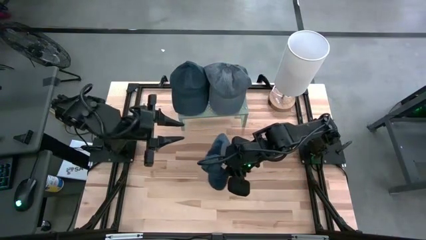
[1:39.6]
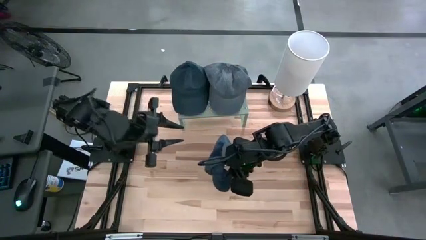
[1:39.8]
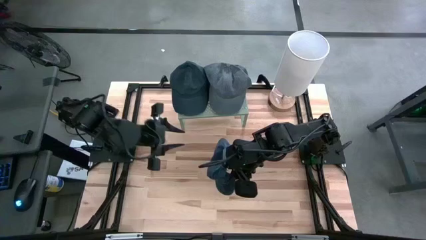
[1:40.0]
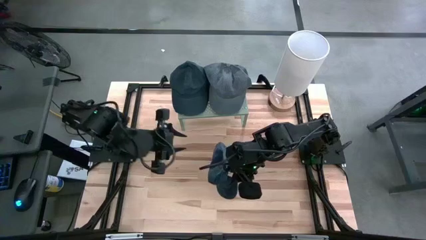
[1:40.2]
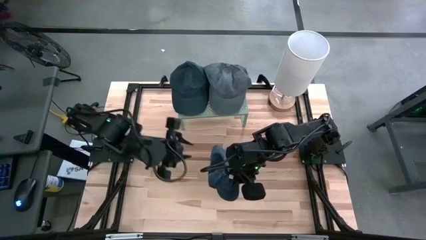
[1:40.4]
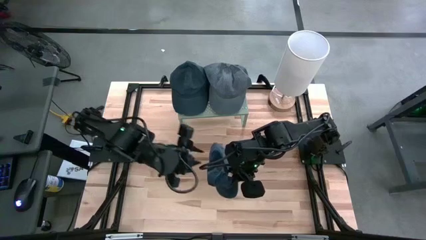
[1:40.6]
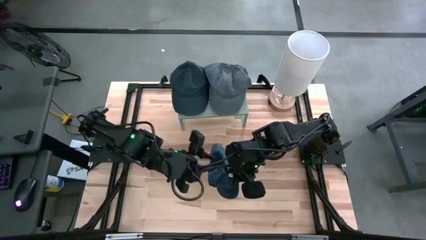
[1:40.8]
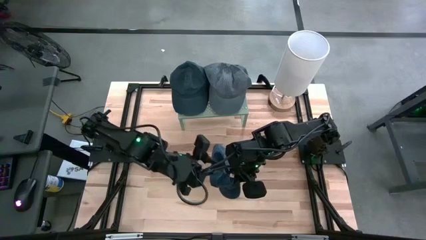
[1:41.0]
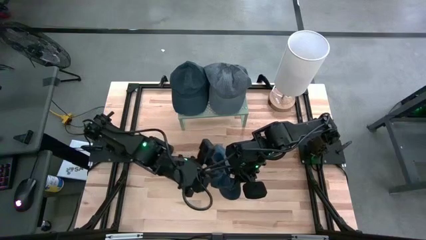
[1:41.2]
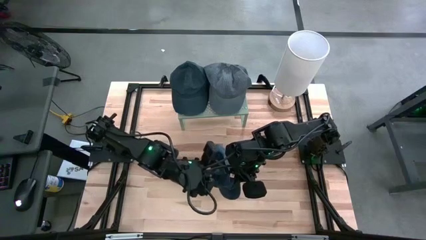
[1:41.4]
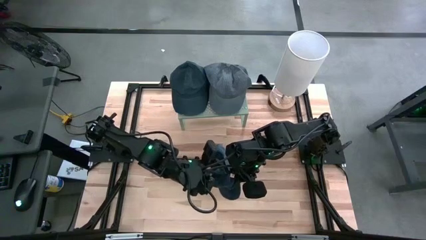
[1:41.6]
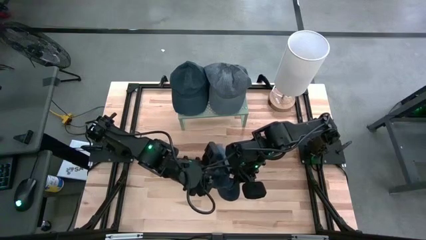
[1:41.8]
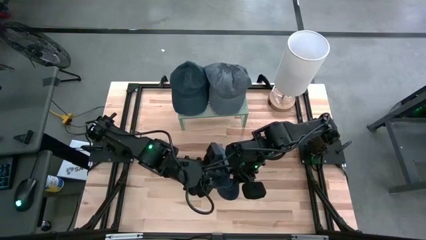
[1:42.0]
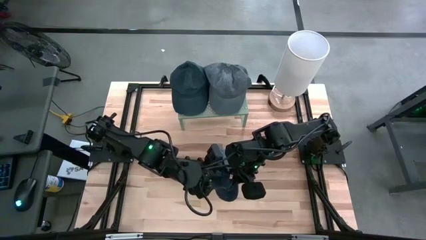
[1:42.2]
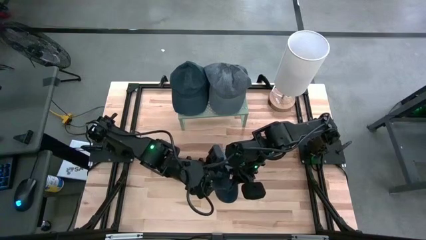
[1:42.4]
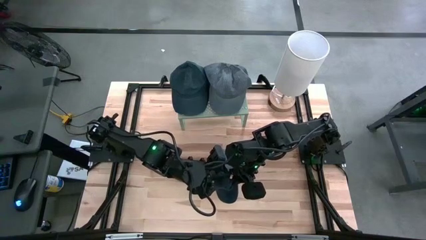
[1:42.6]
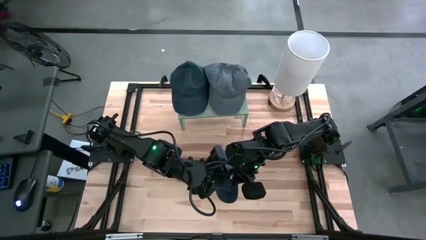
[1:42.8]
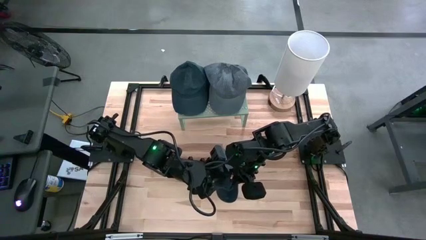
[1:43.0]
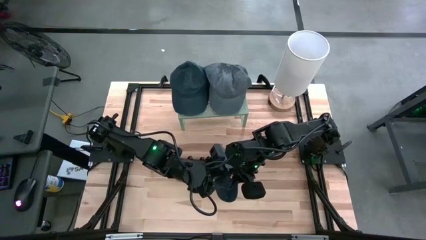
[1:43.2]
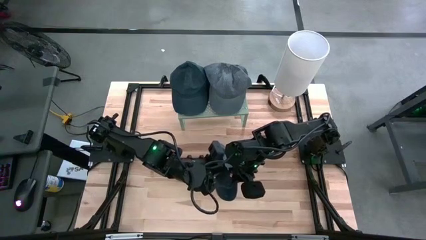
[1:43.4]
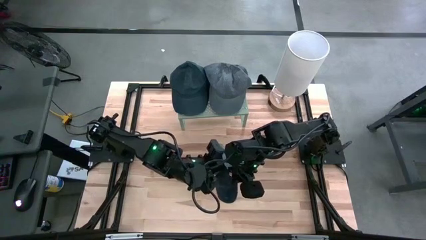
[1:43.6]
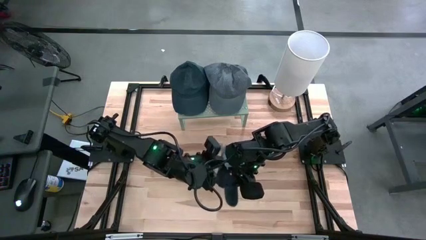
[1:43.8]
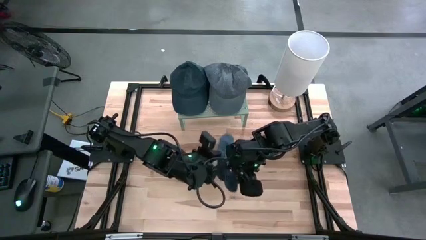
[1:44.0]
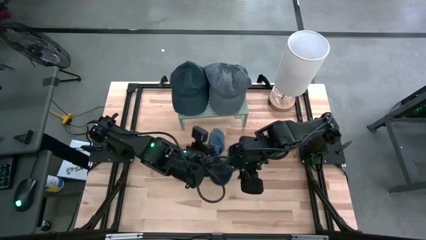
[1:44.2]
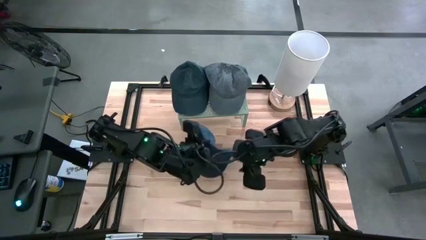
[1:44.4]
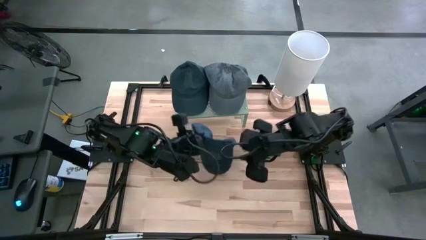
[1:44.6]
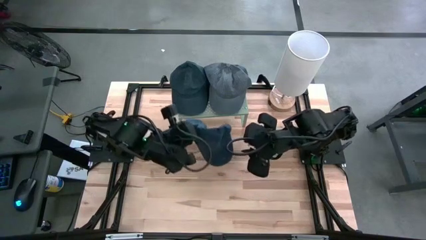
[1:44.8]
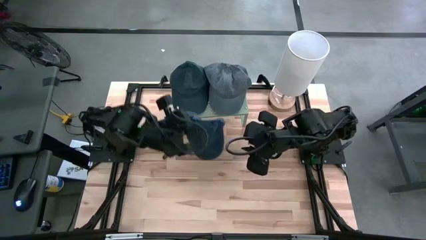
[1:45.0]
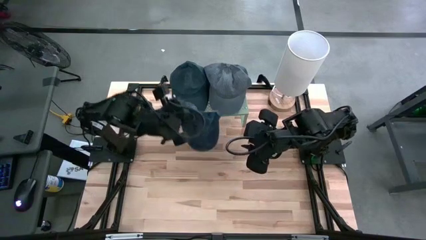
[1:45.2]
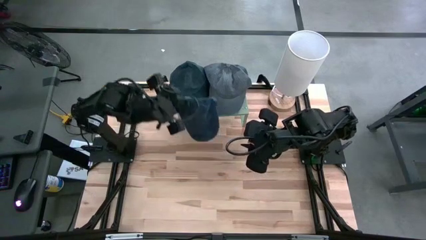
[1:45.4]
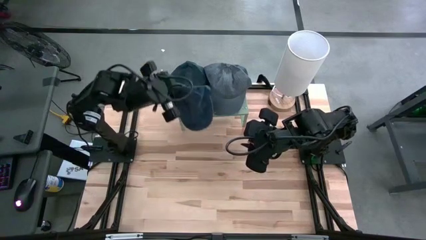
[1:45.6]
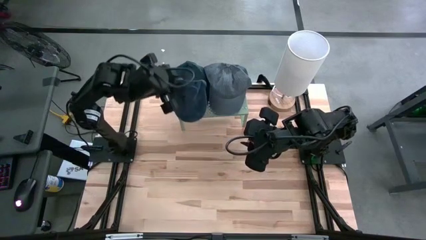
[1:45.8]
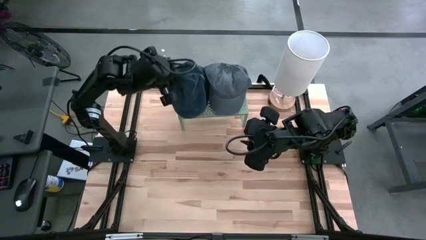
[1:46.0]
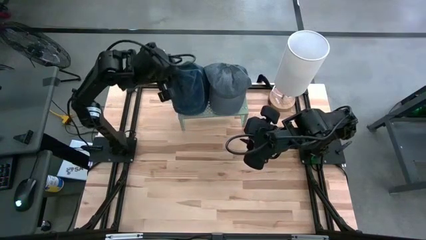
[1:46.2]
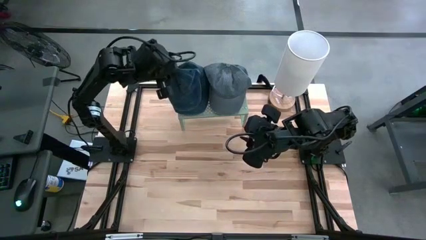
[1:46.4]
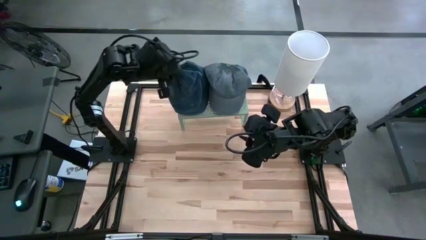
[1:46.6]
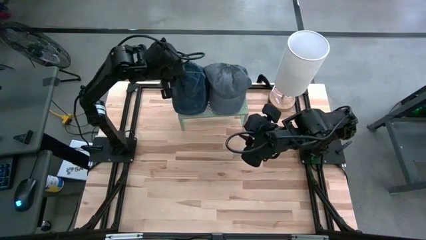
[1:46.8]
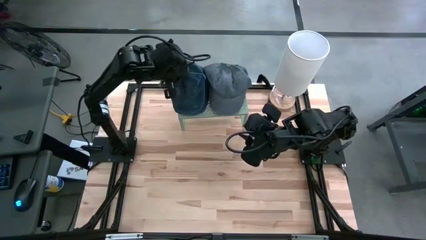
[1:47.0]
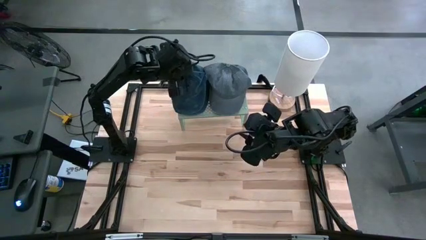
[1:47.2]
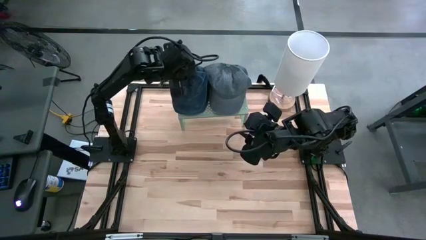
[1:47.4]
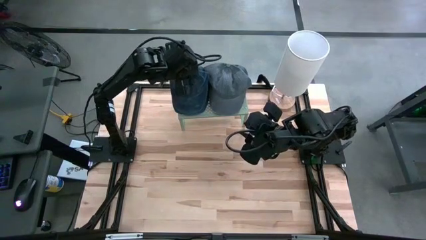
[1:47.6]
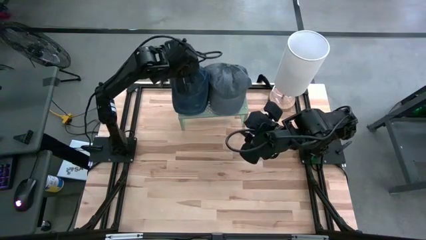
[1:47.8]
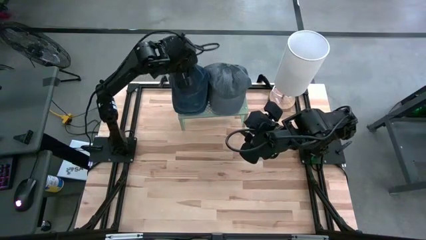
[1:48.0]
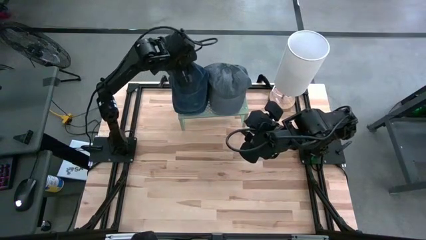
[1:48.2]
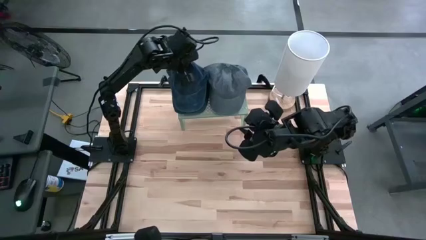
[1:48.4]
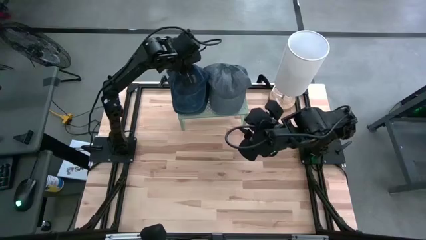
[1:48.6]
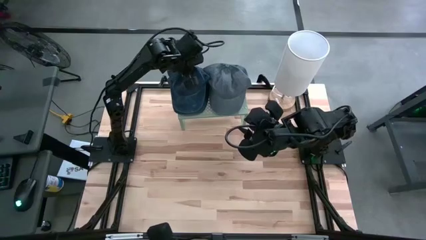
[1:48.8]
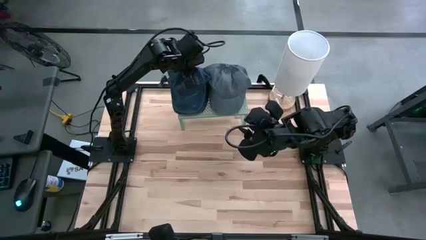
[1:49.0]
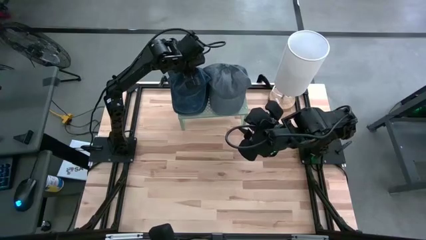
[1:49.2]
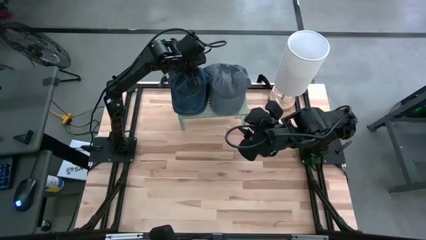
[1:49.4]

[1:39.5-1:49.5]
Task: Pick & Place hat
Stack the blue cap on the blue cap on the shelf

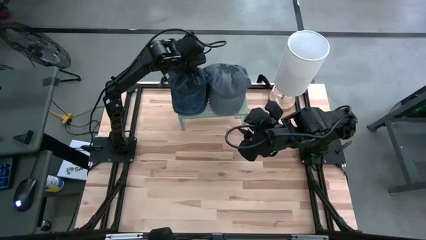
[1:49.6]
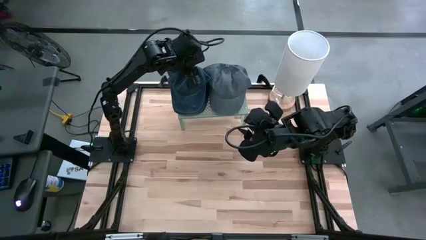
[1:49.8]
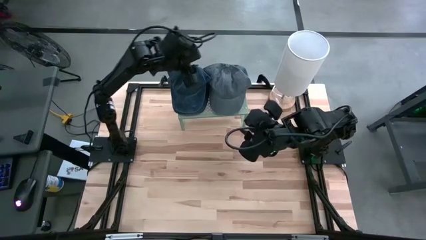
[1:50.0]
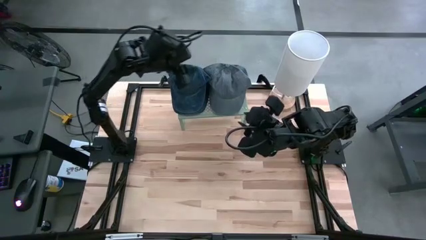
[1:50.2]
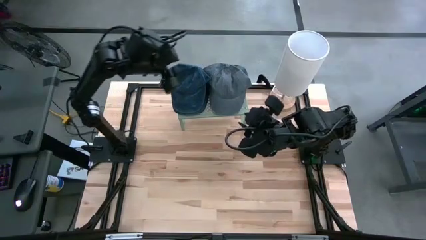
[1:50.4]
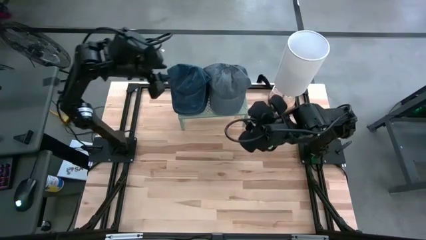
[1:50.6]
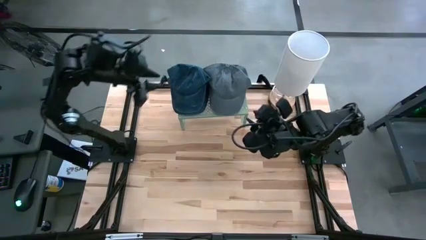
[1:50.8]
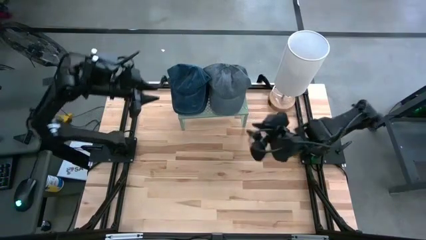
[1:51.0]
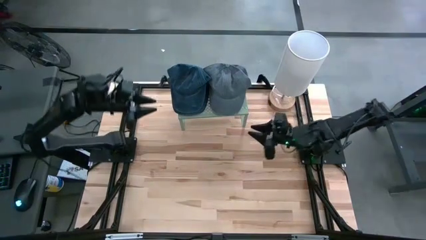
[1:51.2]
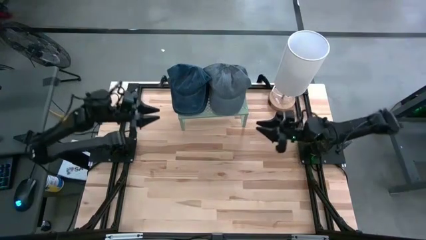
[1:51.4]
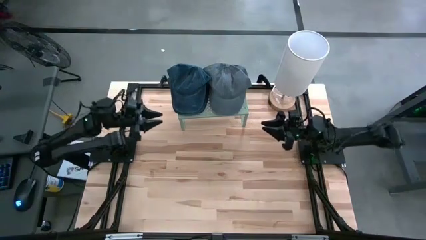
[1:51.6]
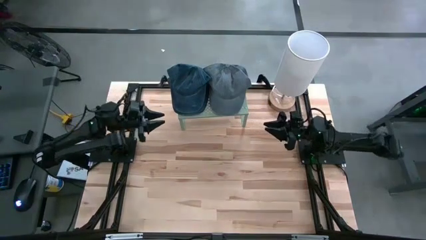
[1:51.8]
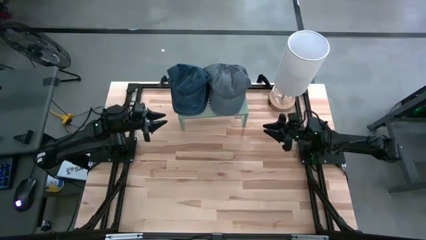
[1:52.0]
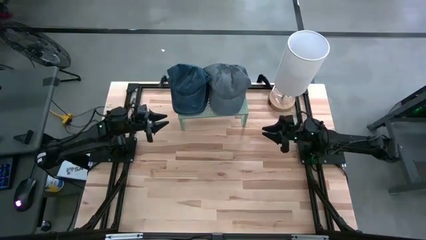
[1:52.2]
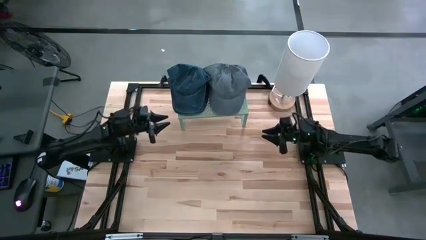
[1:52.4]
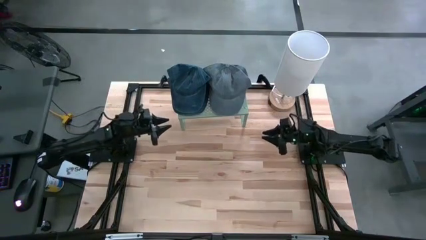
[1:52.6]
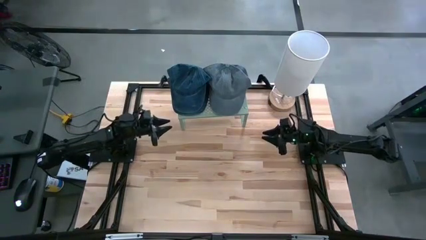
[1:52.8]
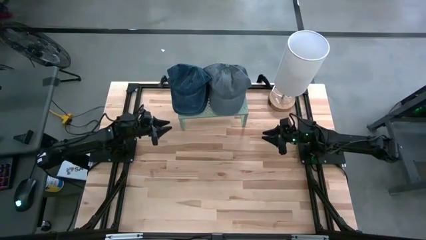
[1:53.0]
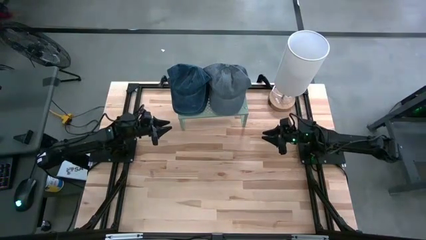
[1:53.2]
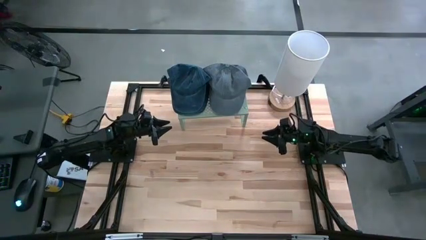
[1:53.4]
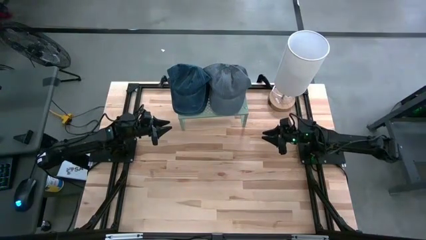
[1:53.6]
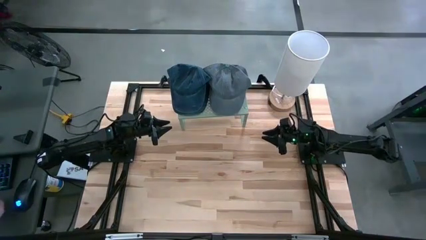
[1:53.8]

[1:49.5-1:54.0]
Return to Home Position

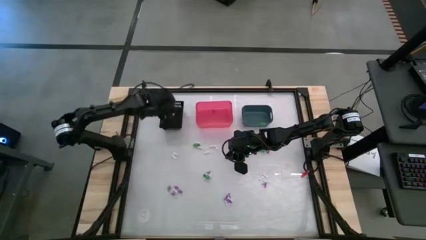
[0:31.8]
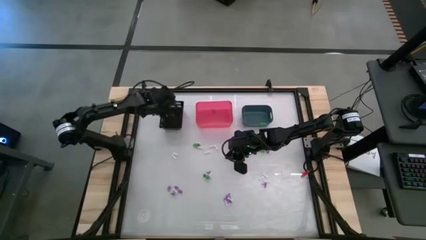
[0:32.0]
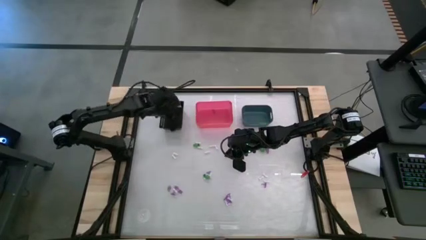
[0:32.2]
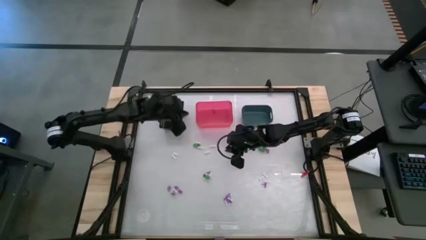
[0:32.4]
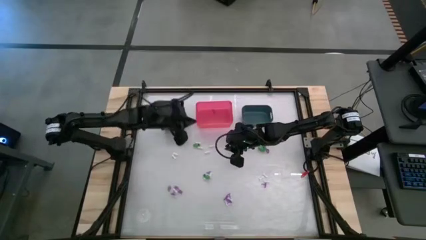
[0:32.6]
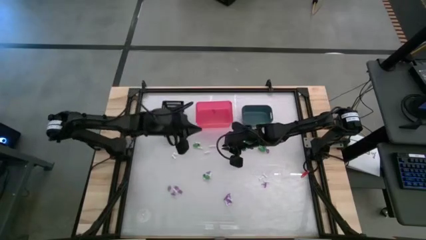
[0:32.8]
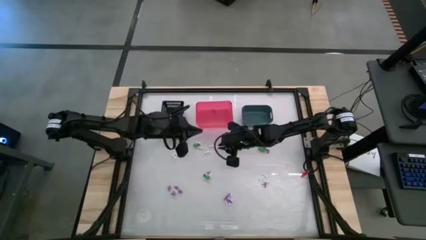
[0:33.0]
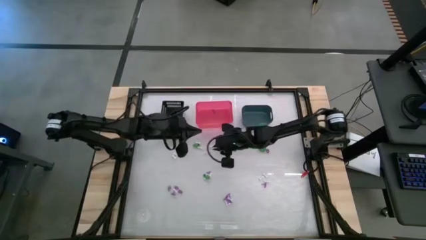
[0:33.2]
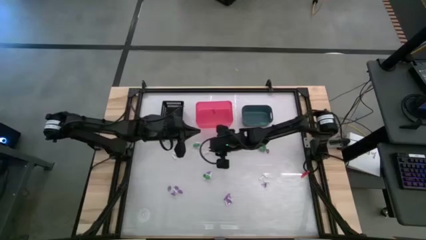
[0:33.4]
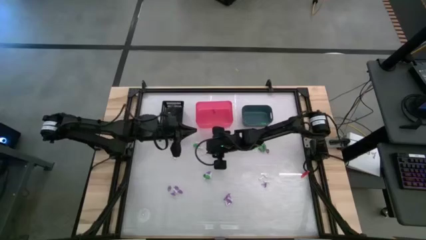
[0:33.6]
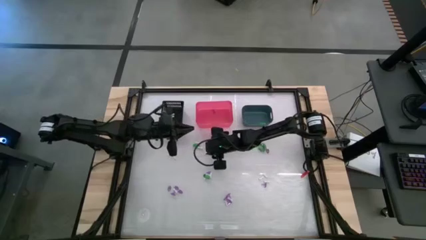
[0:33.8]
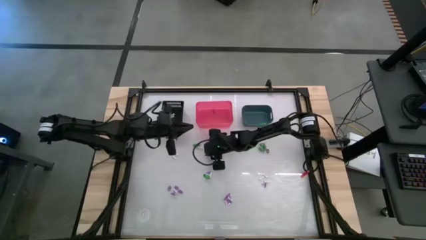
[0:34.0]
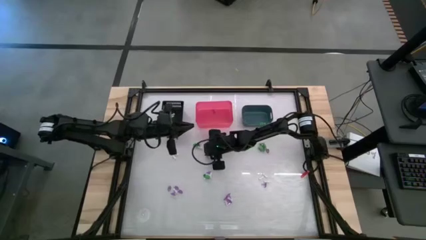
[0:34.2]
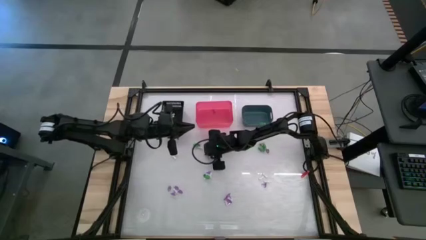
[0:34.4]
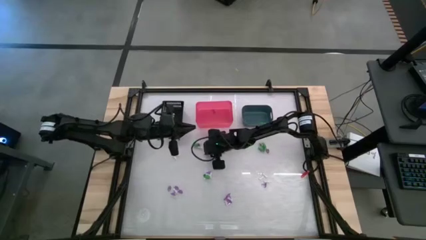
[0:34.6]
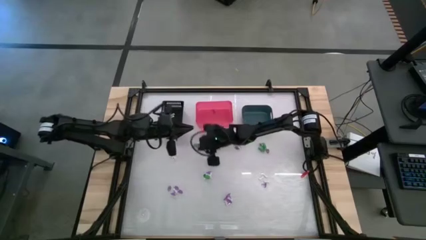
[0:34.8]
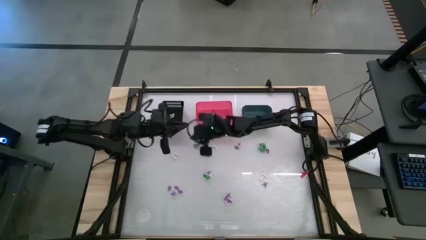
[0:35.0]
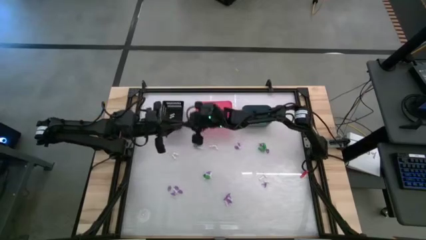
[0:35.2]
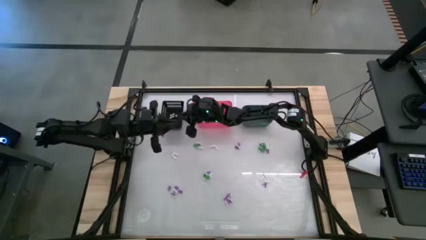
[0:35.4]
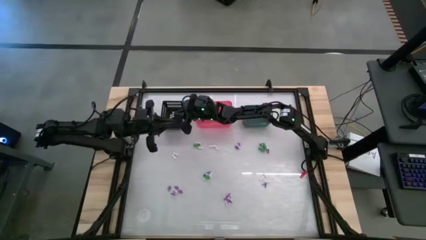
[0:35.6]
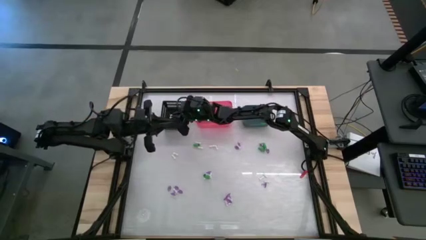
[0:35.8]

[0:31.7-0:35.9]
Task: Sort Halloween decoration
Put the white bone toy into the black bin
